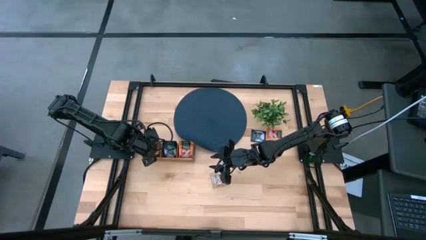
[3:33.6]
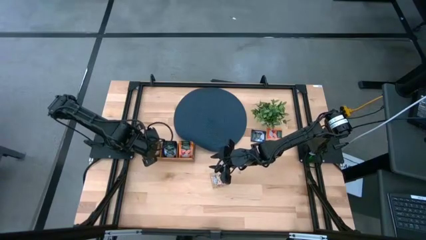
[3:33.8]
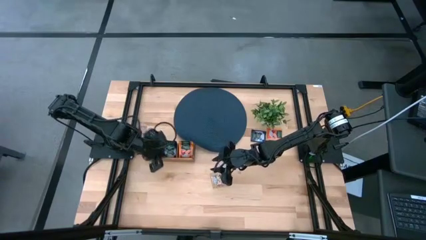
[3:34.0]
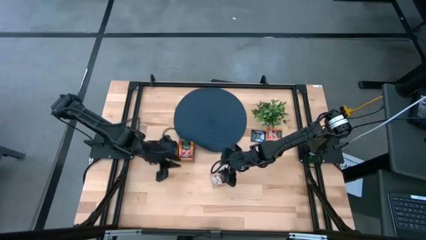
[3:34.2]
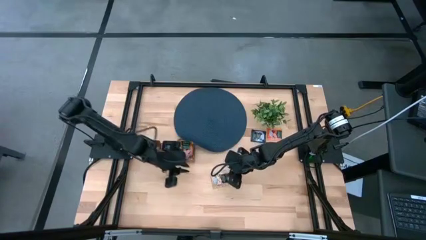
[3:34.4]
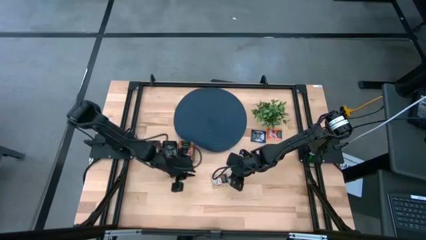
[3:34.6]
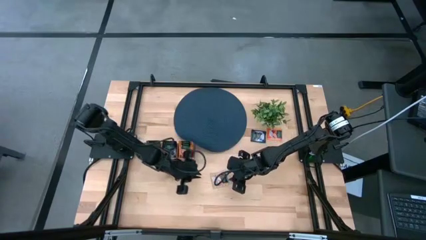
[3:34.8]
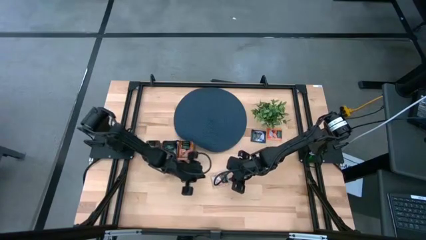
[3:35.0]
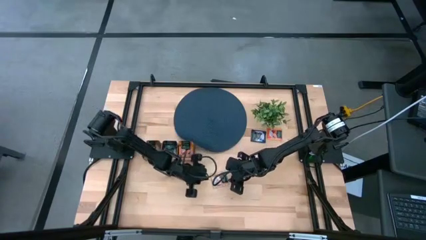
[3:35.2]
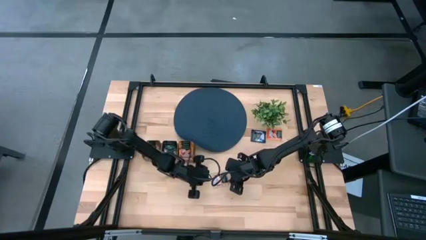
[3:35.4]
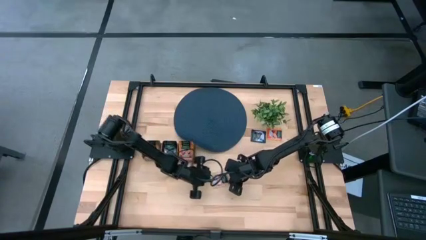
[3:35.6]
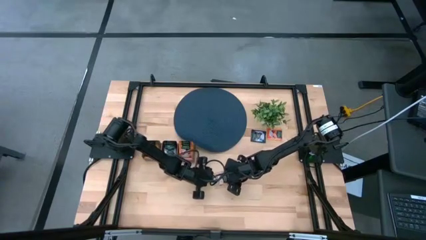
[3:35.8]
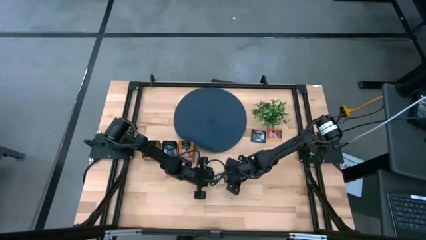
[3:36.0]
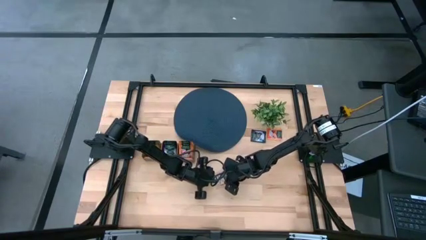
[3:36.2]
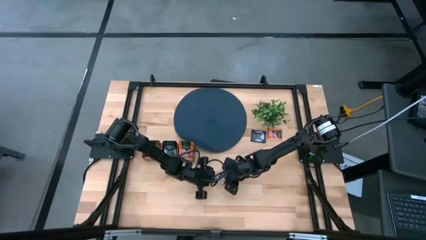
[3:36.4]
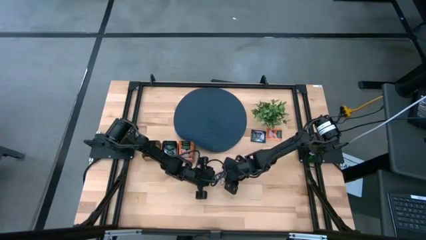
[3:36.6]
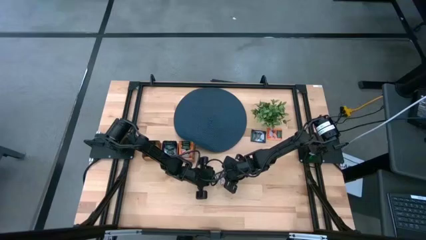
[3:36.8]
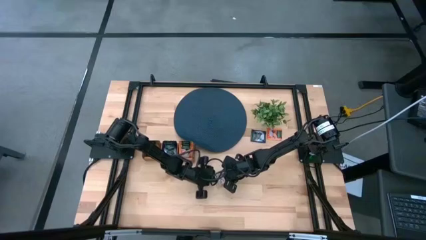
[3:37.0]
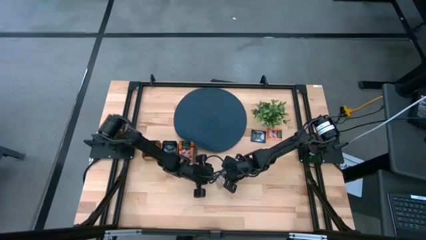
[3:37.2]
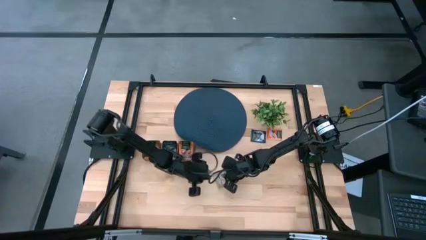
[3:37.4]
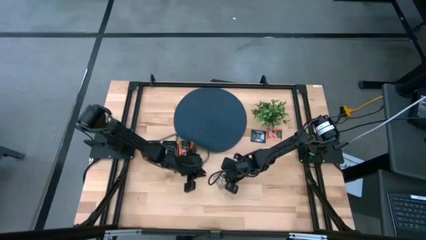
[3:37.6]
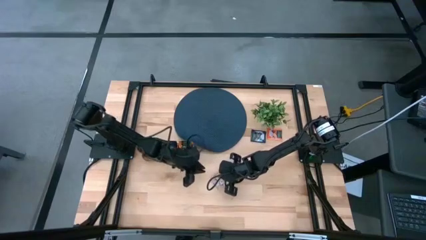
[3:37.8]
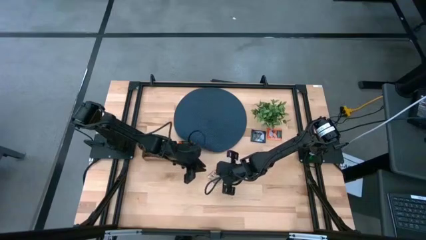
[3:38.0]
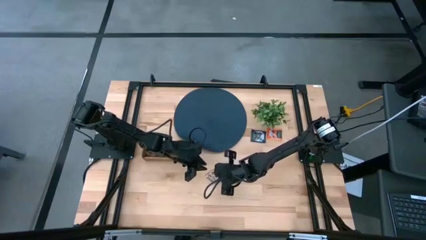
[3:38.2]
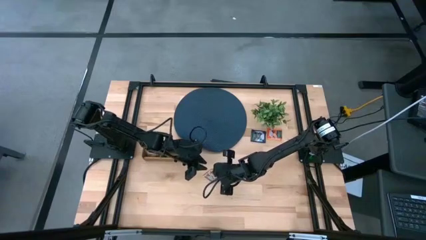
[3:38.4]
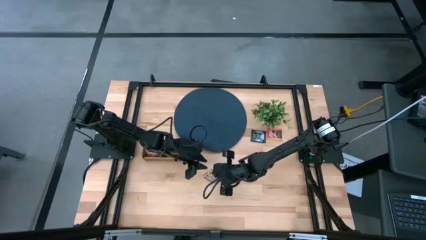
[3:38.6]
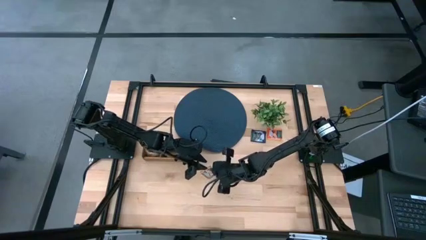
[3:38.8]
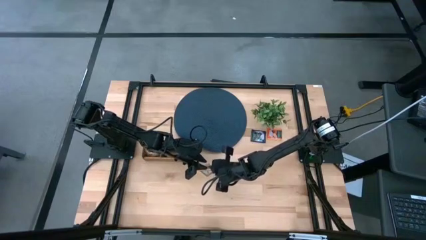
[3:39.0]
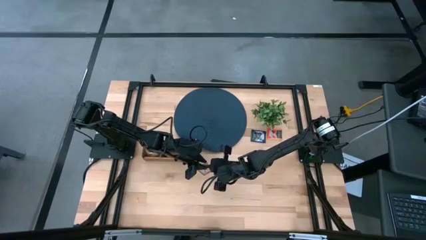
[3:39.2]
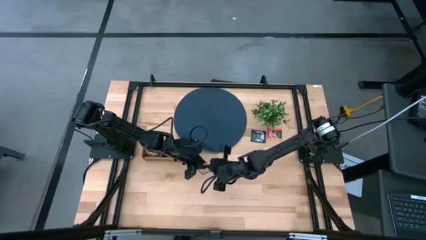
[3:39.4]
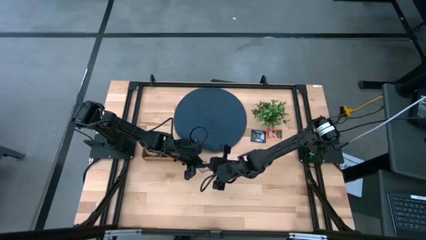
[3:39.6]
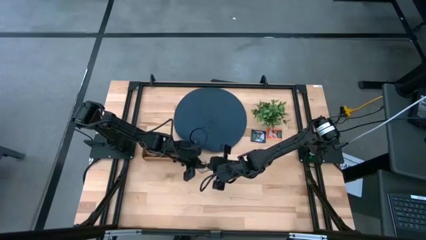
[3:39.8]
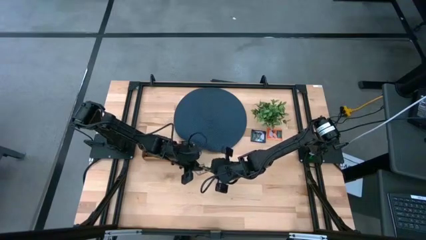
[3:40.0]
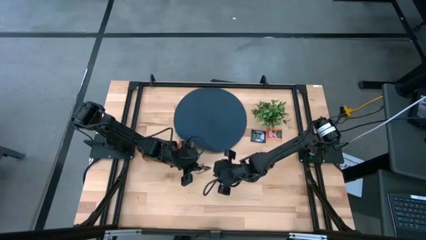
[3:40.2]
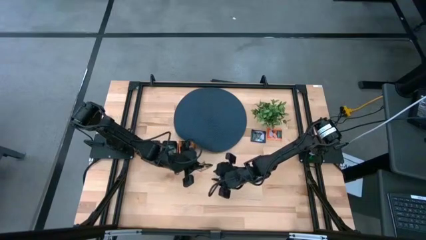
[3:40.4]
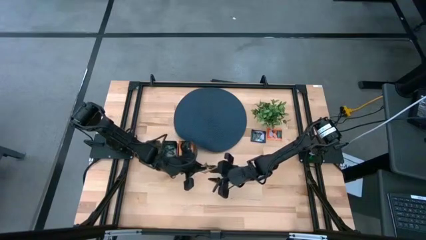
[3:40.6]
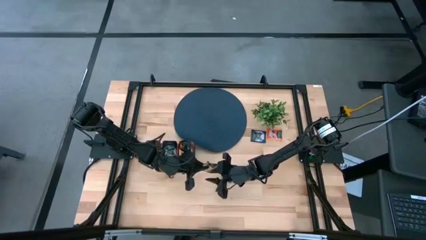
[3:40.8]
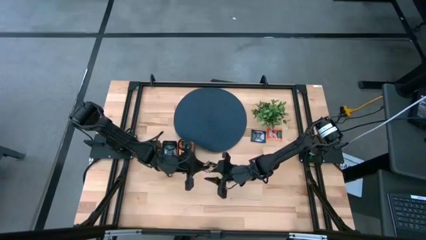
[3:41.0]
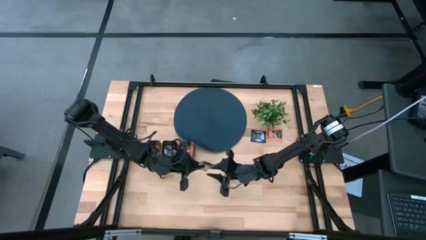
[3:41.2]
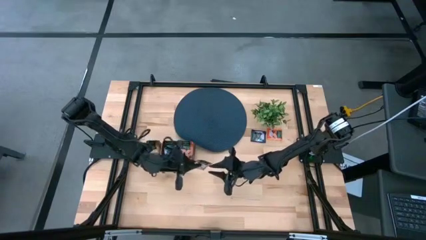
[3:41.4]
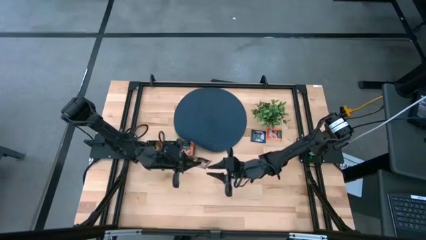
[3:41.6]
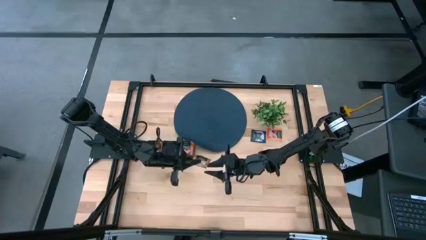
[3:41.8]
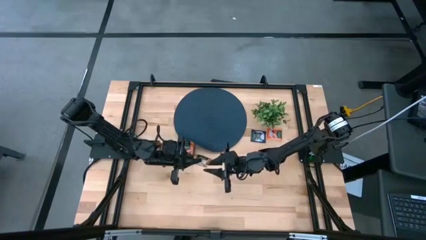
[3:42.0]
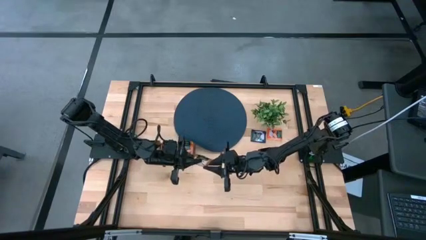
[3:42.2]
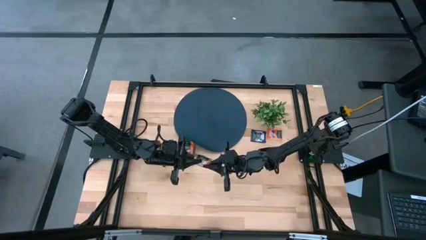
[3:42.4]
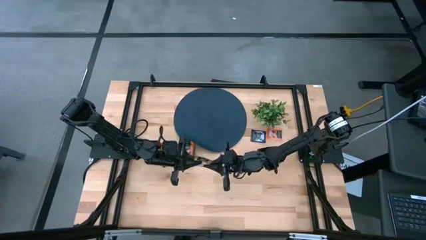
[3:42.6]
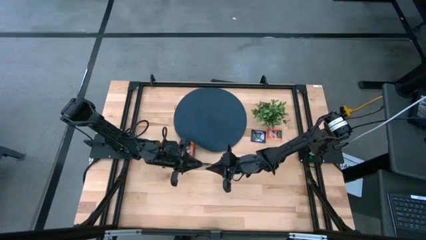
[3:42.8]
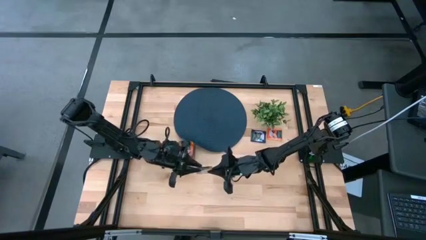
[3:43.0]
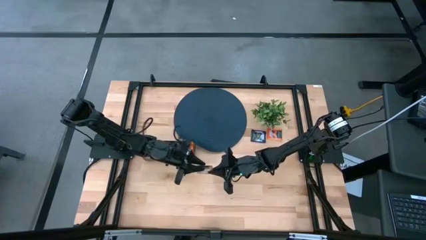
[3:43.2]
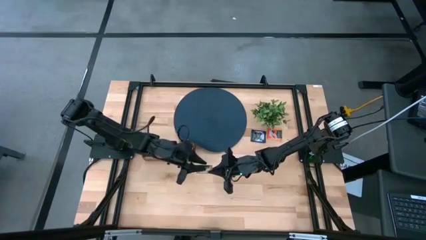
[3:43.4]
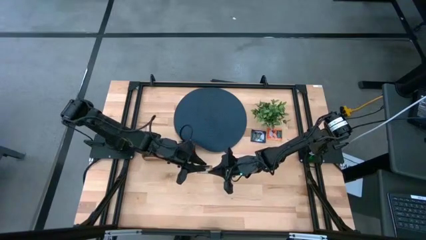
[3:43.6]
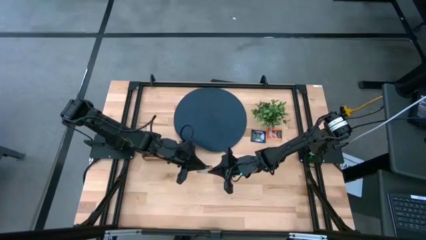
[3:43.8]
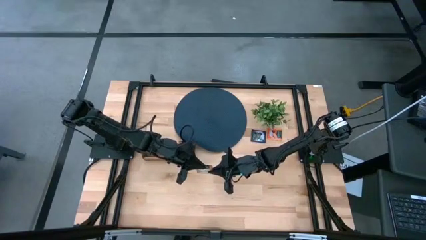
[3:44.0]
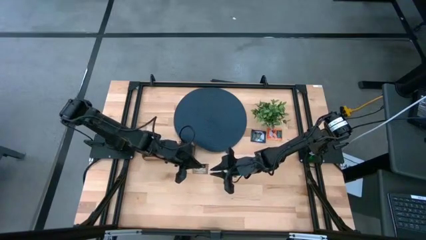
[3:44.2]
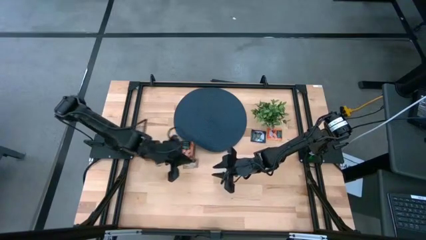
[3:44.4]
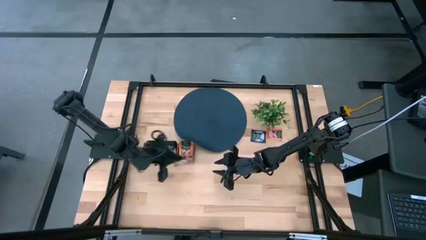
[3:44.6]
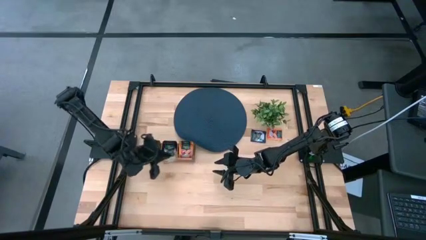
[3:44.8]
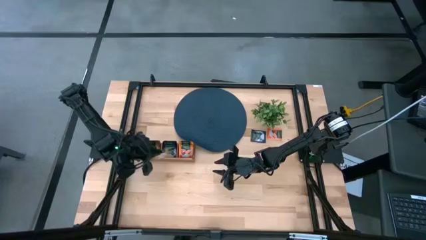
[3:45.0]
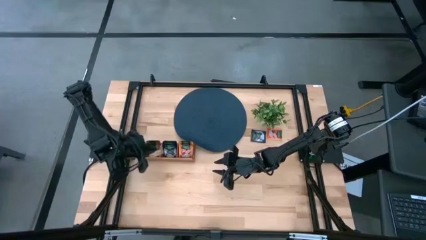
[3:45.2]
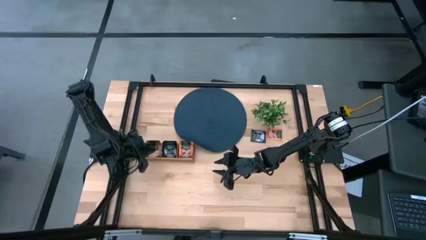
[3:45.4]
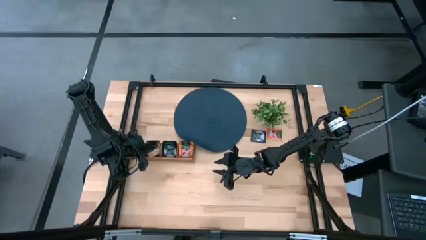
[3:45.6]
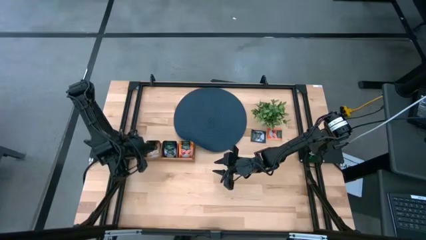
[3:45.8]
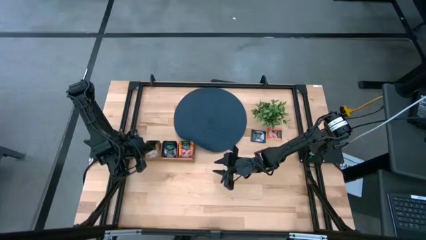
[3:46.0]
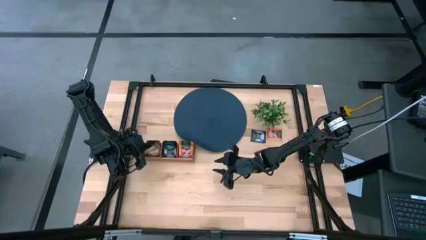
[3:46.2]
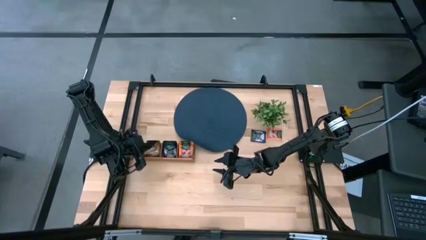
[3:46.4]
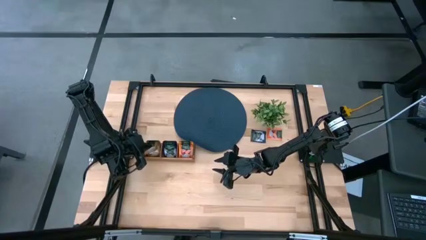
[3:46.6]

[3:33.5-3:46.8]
Task: Pick & Place Tea
Put the brown tea bag into the left section of the wooden organizer

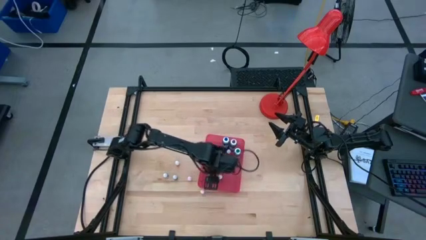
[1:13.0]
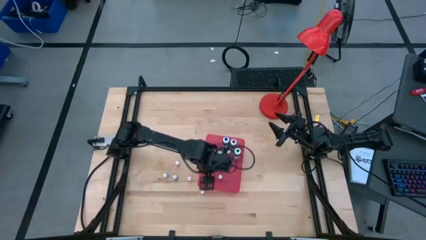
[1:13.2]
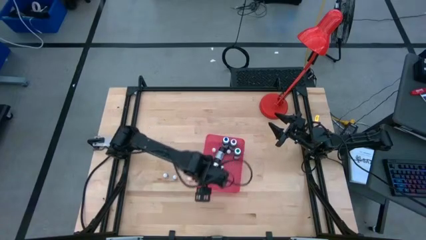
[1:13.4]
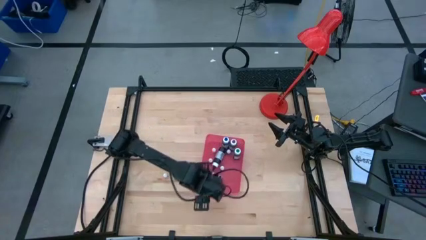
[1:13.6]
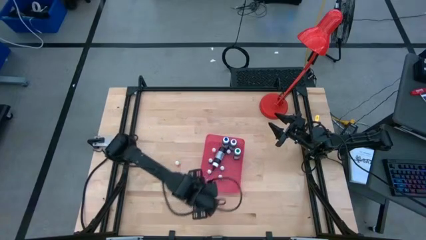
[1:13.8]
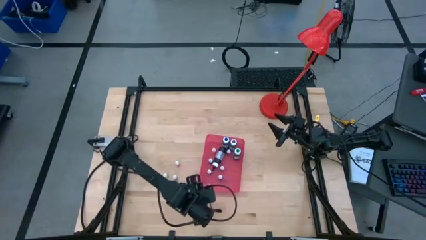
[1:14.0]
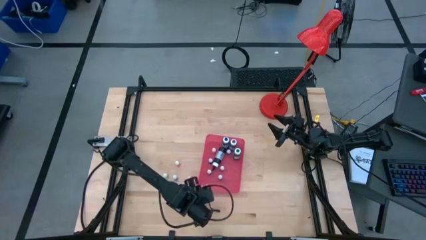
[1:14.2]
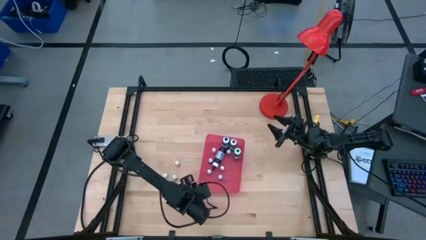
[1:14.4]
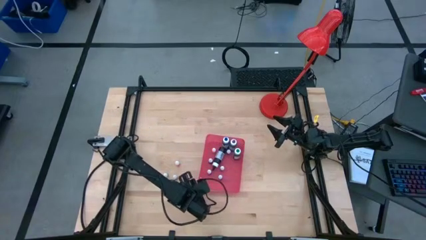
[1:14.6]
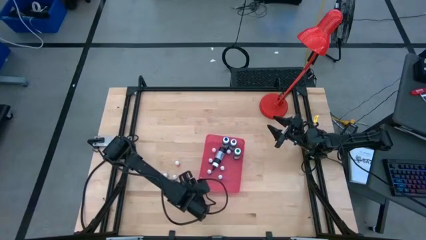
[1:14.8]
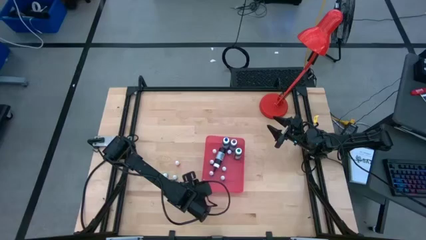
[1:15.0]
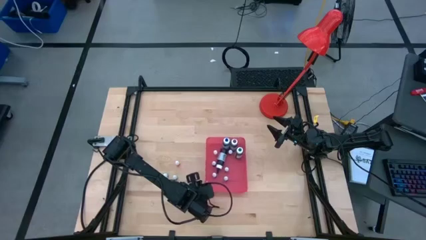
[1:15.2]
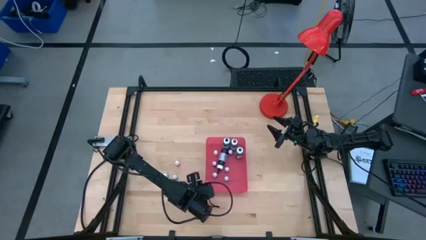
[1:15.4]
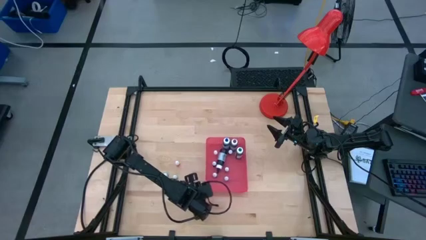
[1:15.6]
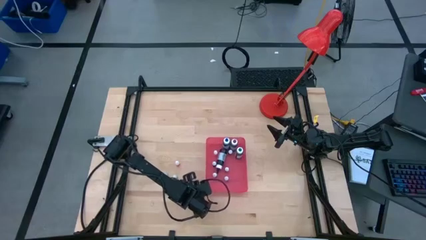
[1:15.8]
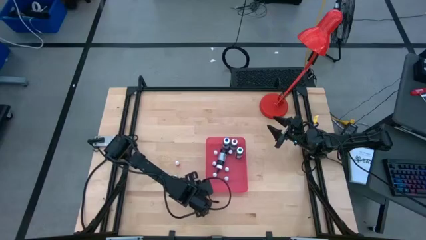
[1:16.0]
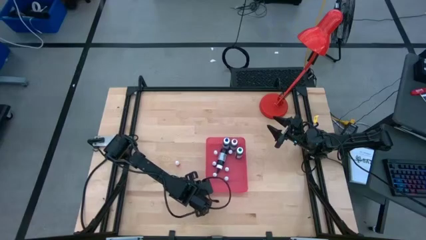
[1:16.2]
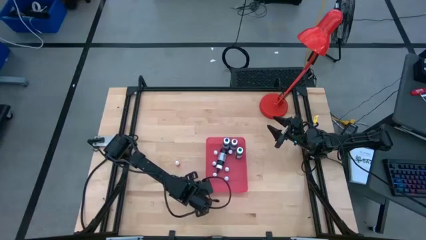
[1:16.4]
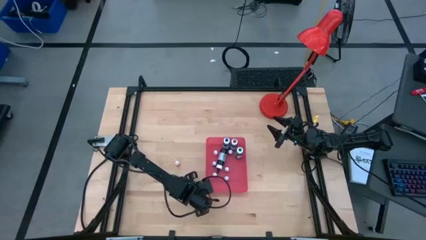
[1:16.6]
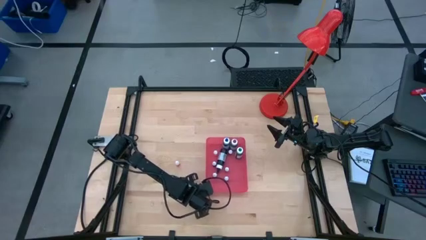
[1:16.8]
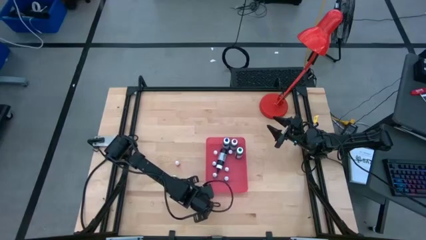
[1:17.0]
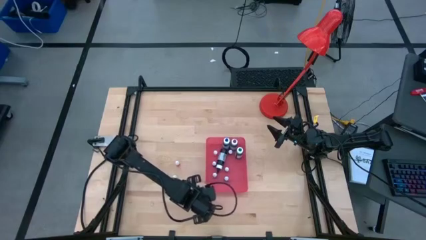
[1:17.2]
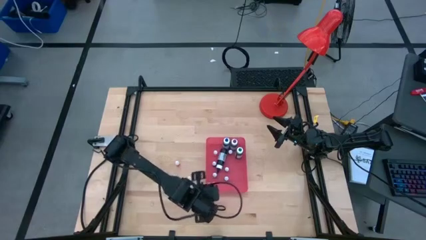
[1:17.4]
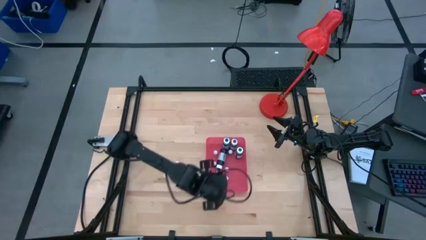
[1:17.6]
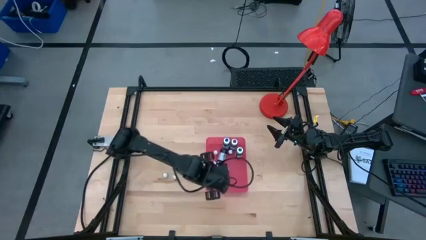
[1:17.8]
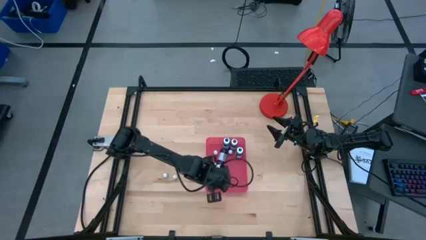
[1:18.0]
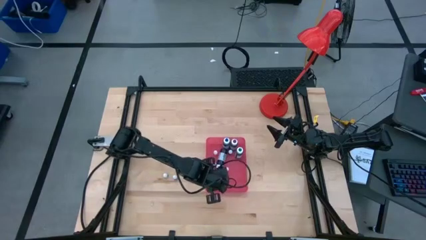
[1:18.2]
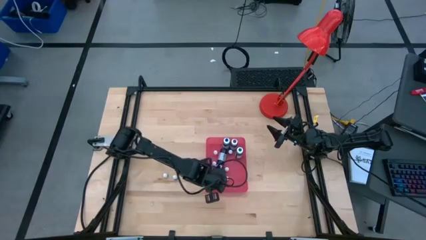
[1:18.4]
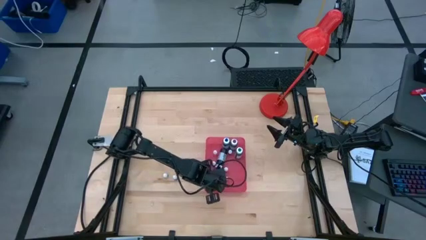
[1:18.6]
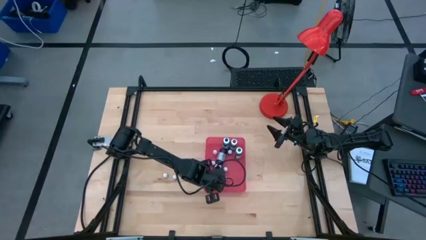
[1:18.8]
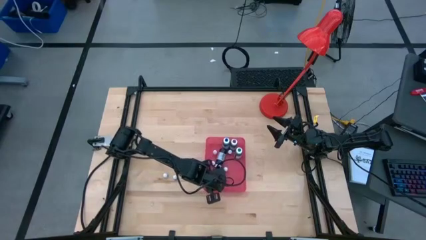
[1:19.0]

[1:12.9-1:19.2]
Task: Pick & Place food coloring
Put the small yellow food coloring bottle into the red bin
